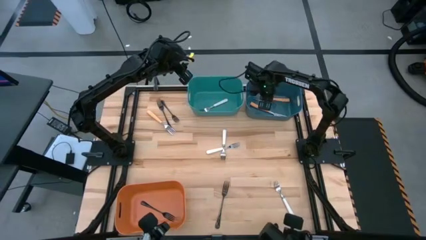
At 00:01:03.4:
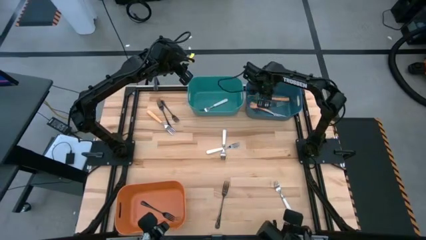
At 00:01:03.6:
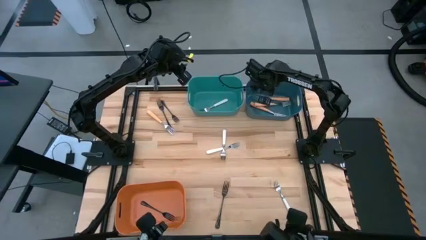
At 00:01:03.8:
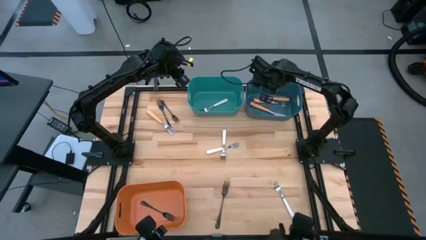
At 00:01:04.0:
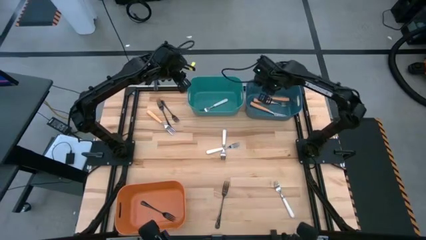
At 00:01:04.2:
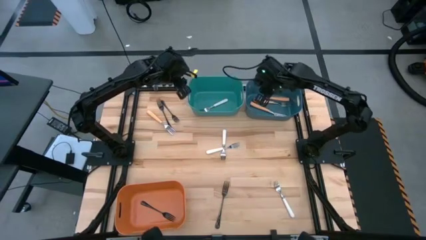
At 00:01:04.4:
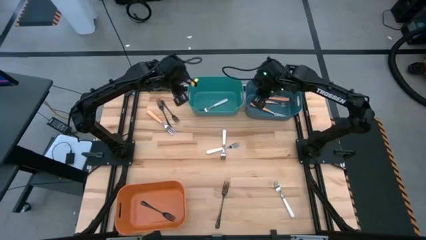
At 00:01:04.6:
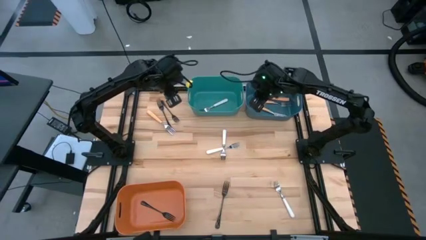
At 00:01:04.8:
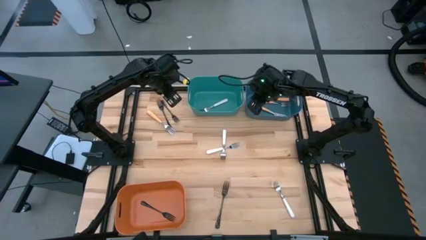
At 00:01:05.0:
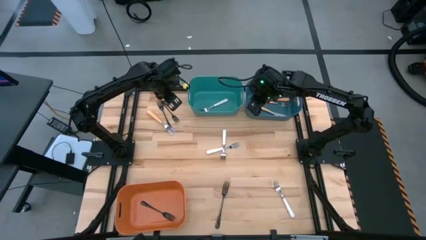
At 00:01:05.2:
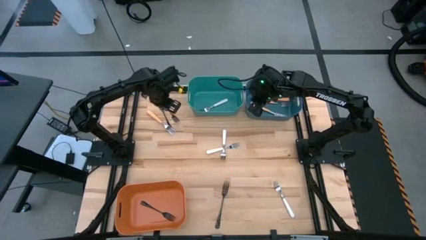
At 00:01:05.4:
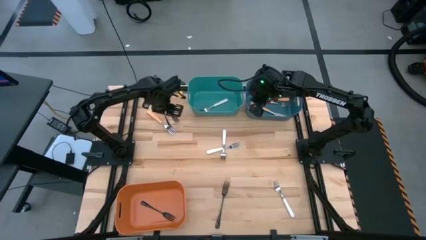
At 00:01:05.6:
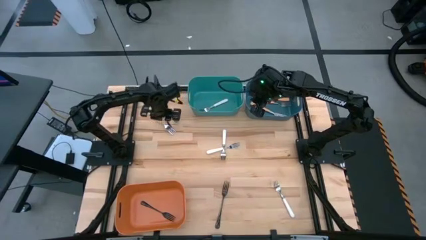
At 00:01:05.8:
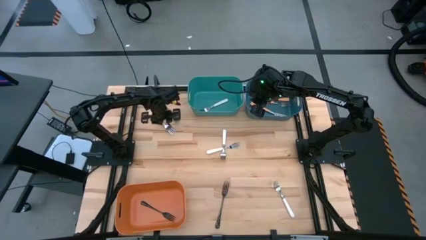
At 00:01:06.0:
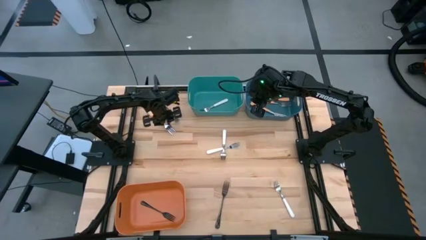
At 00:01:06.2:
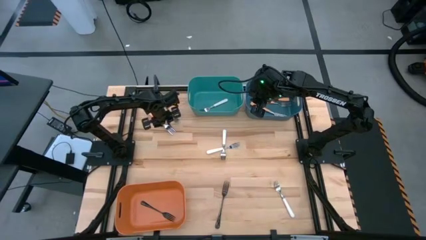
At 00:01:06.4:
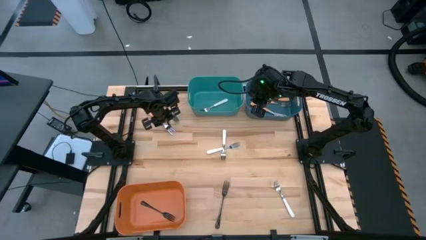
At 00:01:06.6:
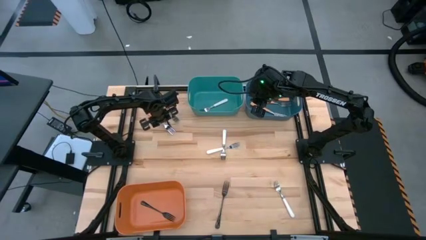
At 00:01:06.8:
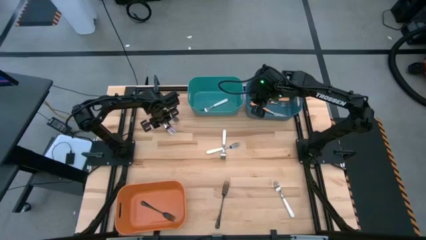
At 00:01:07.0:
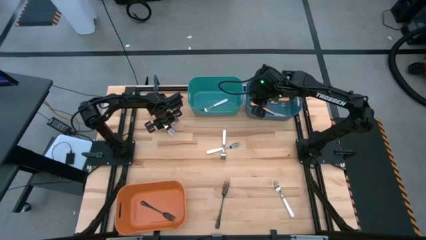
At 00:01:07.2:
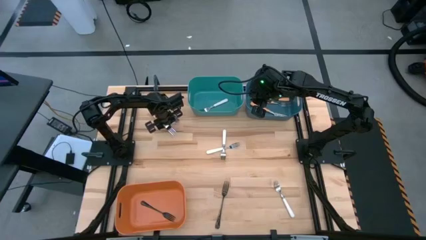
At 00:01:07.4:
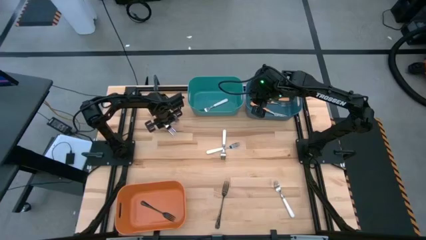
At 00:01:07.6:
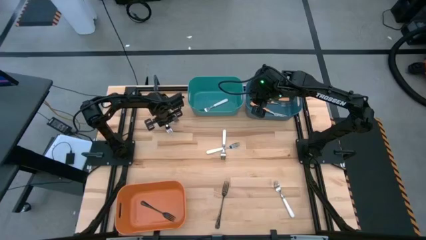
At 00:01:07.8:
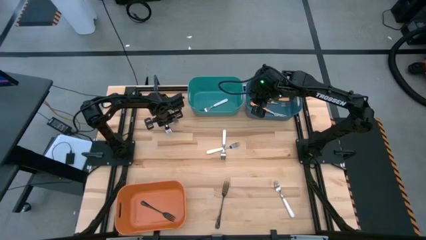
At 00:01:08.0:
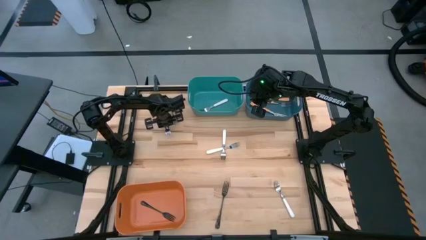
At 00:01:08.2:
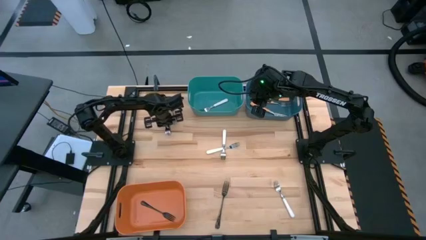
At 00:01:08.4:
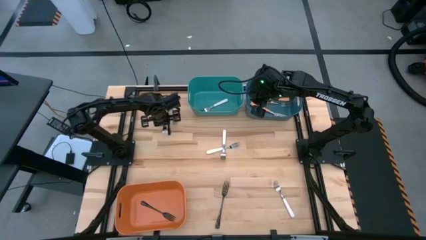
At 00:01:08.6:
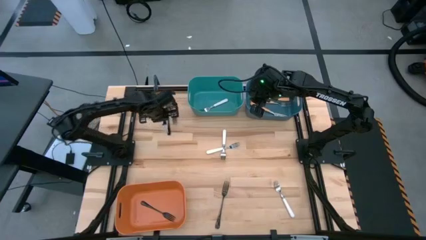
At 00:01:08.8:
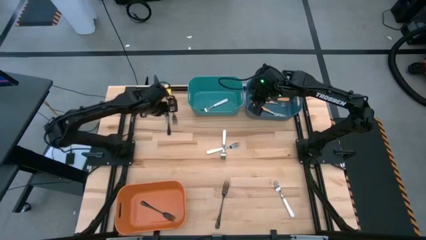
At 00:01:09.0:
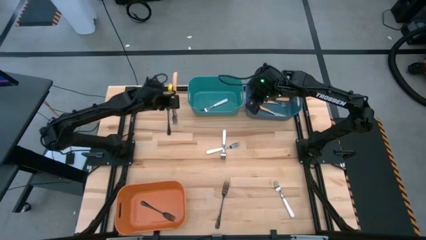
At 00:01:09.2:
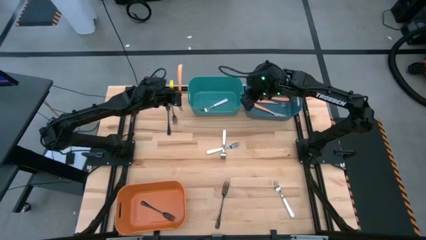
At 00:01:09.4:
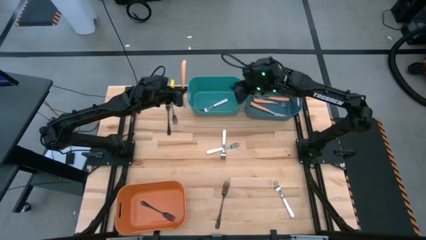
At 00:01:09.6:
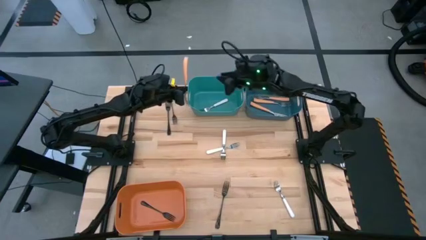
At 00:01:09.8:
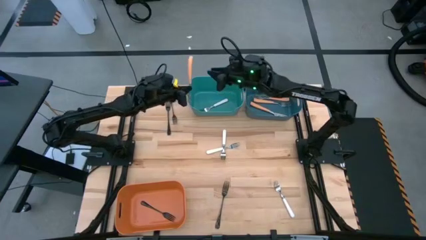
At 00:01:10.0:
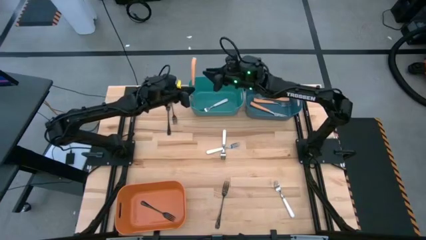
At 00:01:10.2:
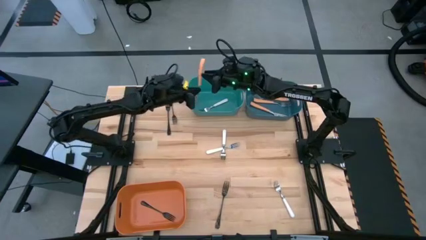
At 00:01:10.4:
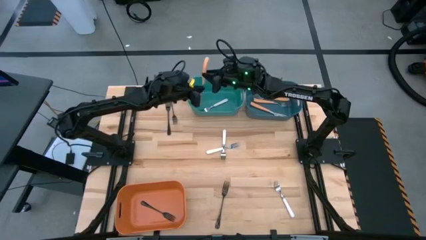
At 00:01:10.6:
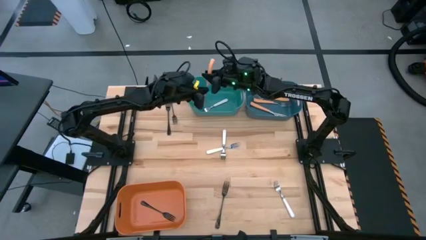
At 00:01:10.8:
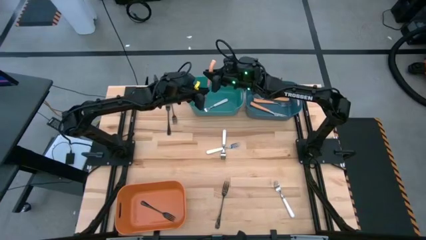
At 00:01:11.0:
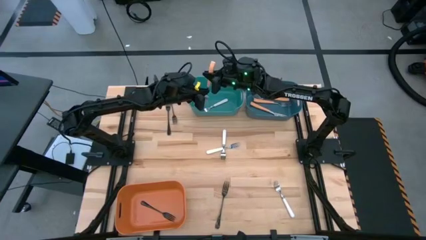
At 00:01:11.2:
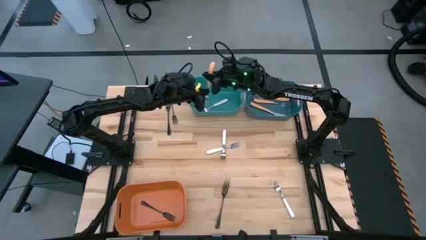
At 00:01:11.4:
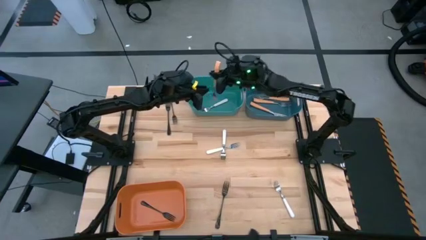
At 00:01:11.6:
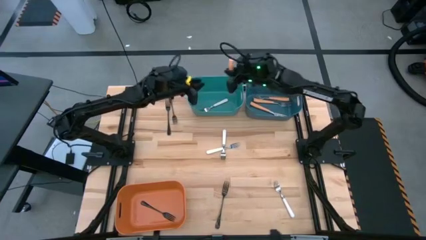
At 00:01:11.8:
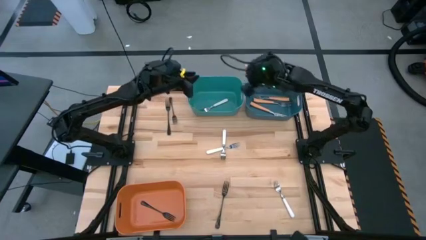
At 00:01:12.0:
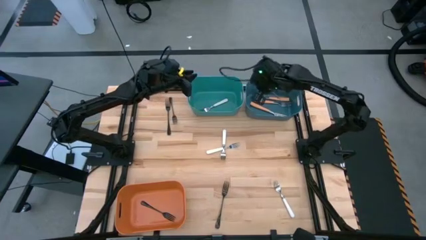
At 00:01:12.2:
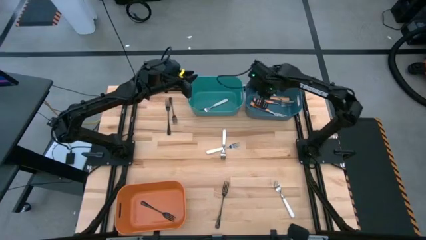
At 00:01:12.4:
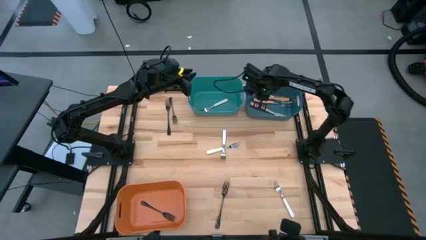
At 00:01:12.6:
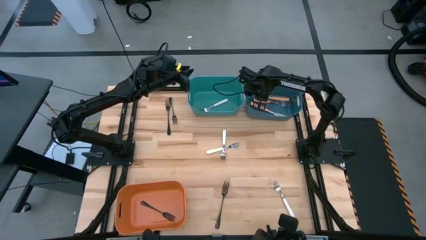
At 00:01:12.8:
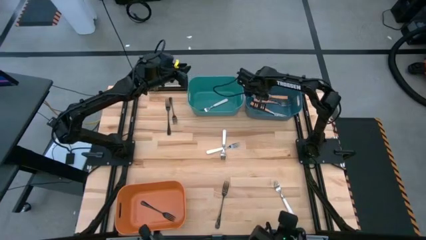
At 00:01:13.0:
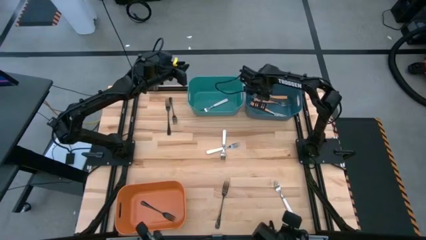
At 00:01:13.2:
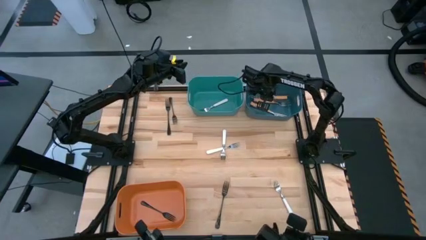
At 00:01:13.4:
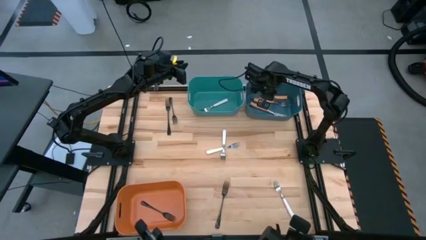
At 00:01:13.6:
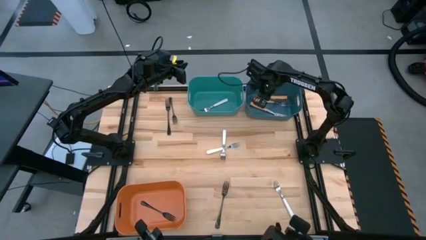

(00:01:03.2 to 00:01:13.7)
Task: Sort silverware by color (type)
Put the orange fork into the blue bin

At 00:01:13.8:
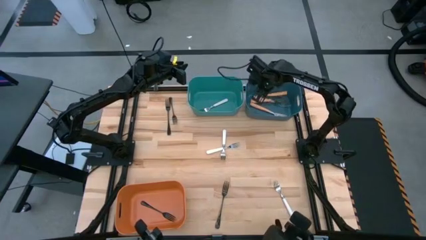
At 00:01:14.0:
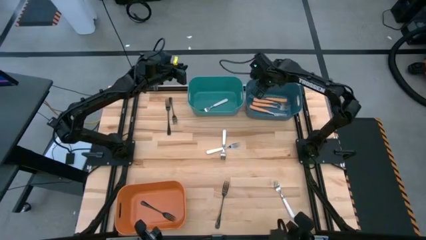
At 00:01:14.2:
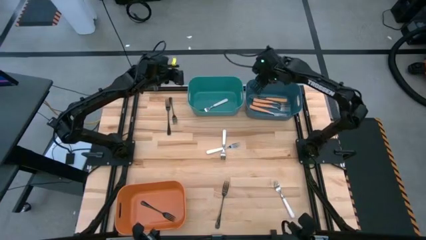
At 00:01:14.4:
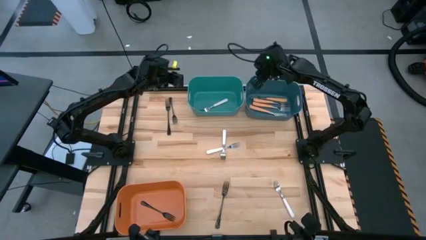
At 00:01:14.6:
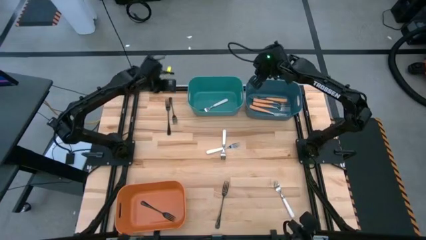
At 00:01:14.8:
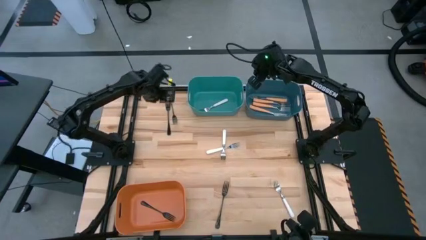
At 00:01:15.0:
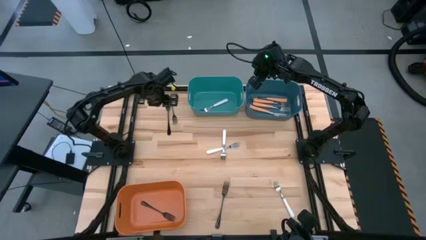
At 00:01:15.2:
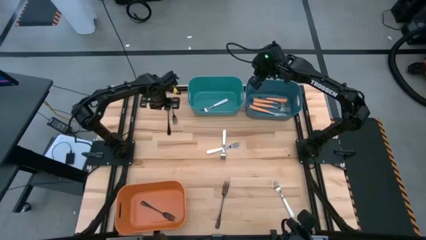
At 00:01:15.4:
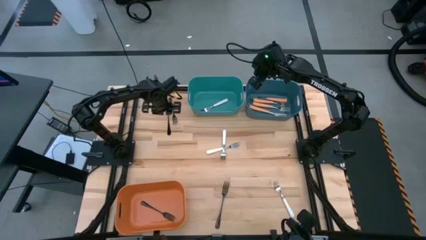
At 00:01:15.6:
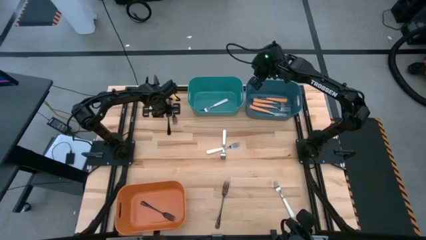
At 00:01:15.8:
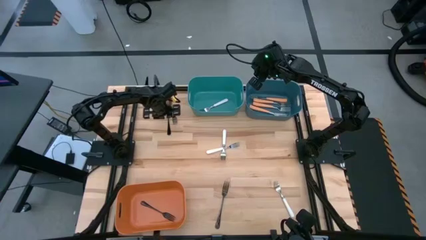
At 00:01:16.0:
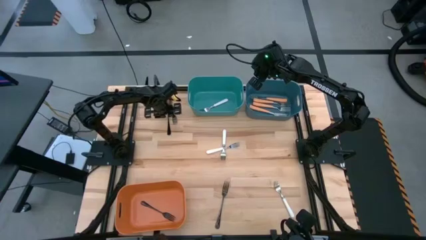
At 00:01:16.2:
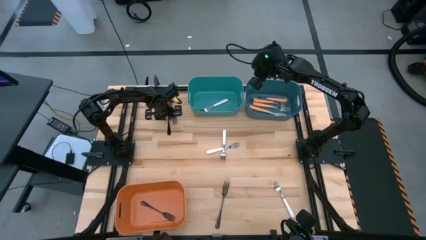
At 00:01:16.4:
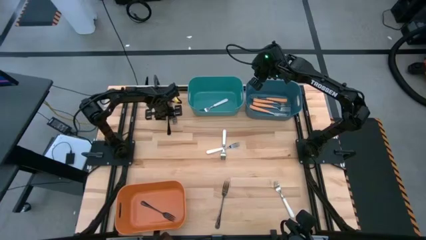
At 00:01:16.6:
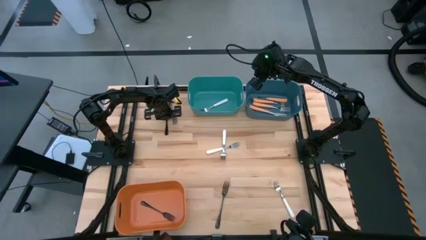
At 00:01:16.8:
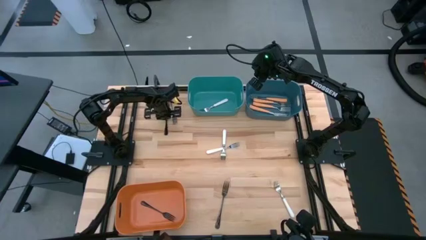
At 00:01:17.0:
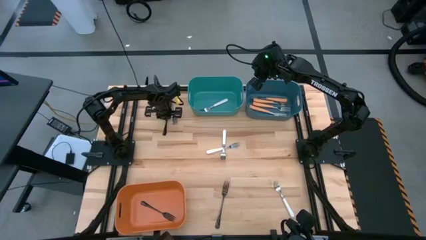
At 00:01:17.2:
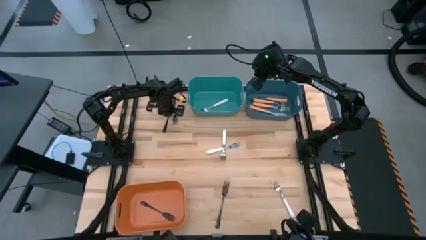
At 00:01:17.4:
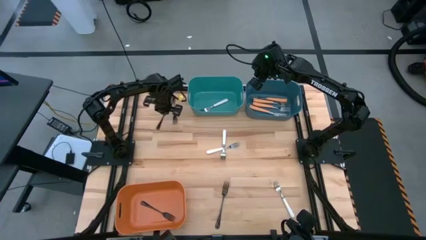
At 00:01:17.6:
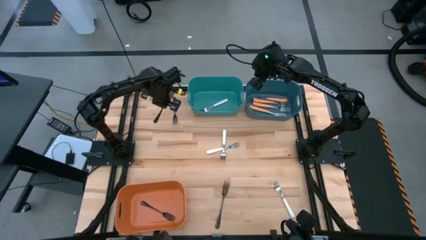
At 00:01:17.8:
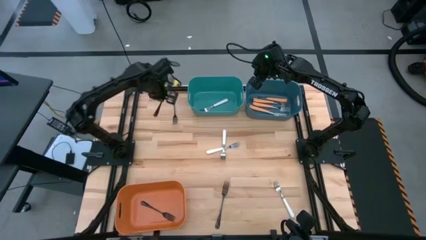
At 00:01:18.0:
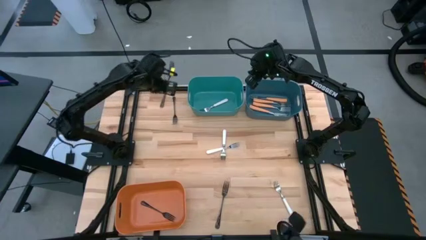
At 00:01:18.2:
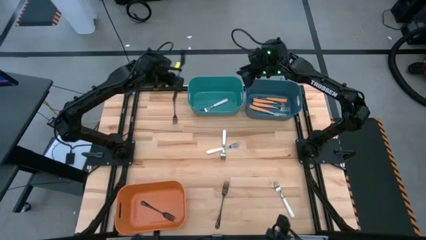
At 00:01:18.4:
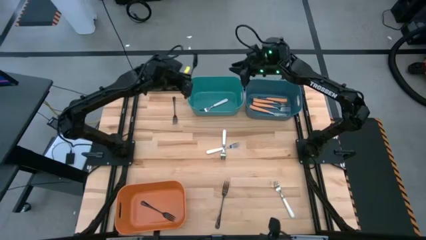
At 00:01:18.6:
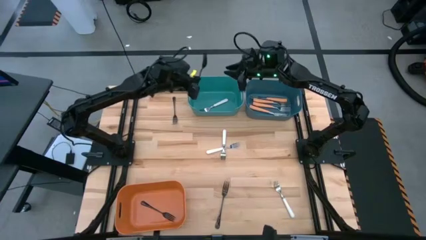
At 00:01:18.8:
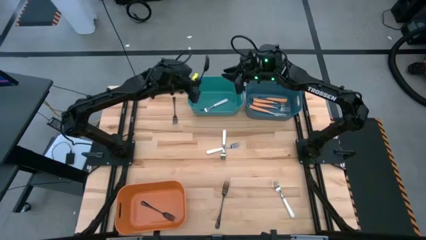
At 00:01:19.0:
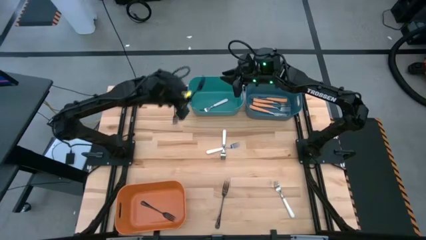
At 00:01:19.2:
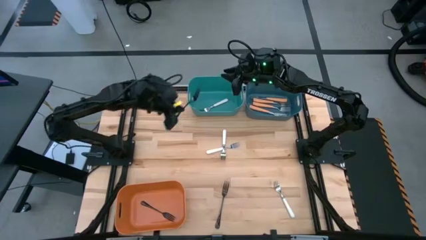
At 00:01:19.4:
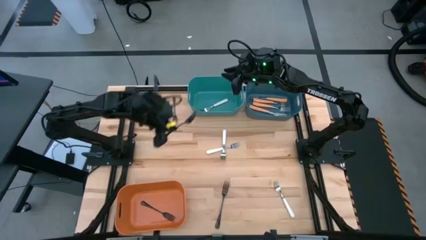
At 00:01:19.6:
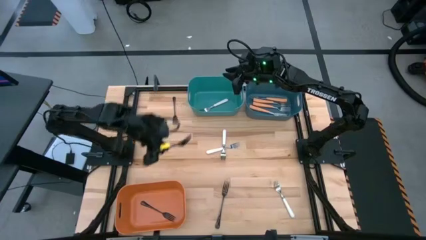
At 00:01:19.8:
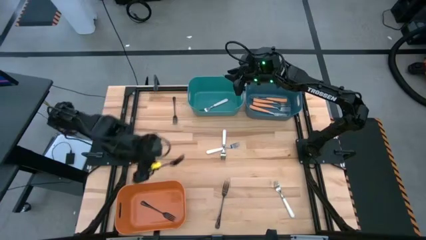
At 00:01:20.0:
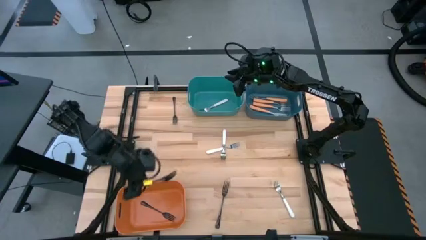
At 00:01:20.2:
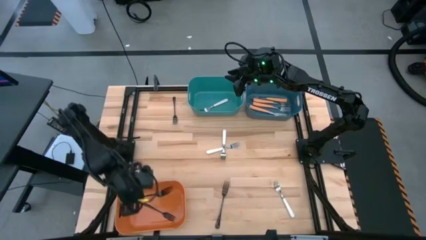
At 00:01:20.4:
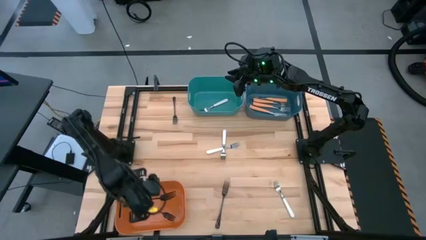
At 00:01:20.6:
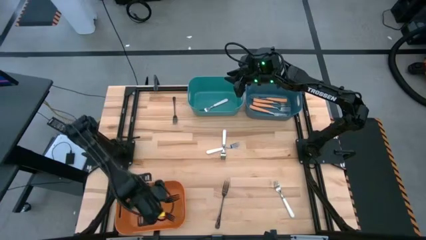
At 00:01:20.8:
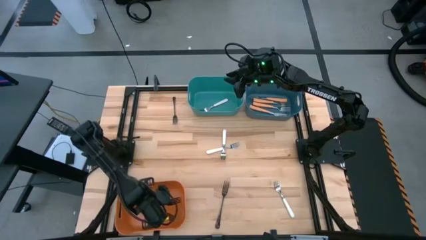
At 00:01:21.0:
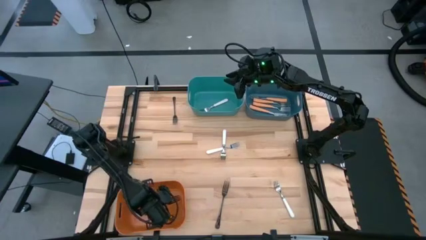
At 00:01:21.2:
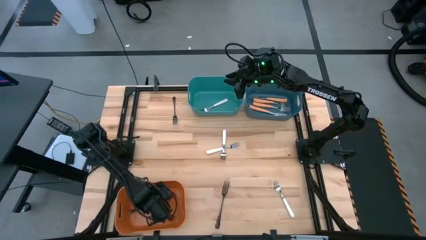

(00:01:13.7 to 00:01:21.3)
Put the black fork into the orange bin
